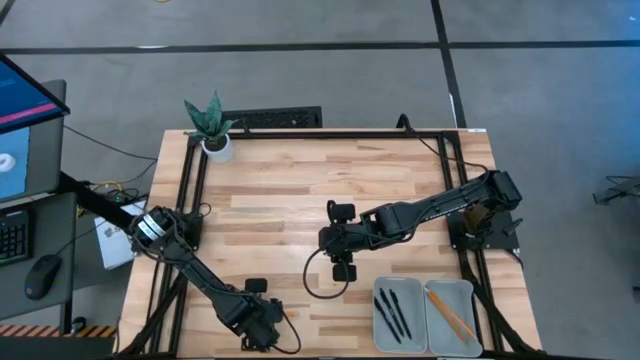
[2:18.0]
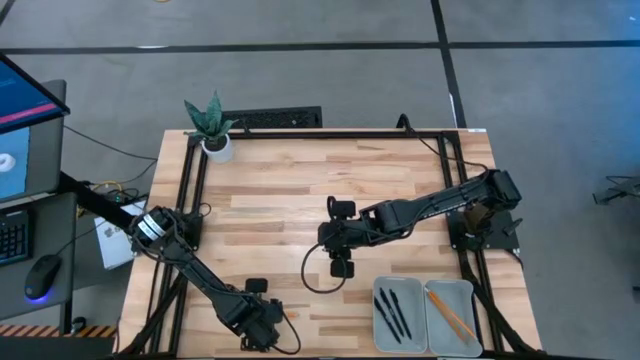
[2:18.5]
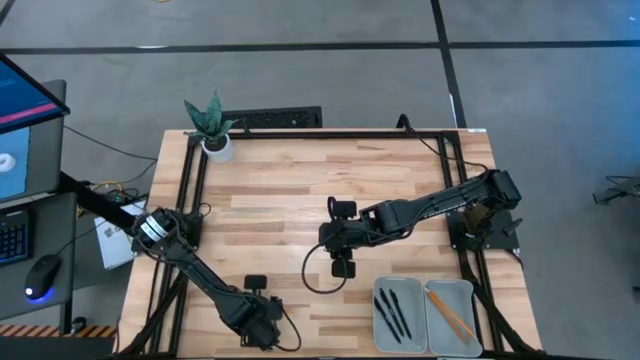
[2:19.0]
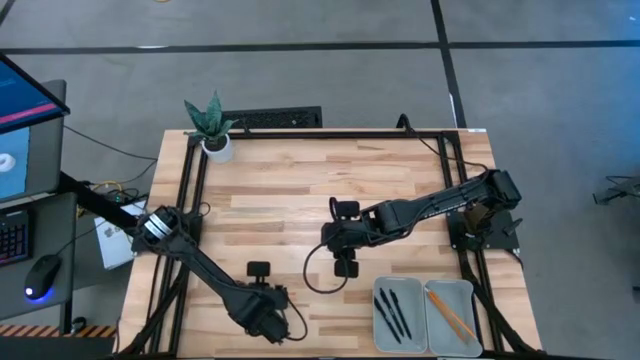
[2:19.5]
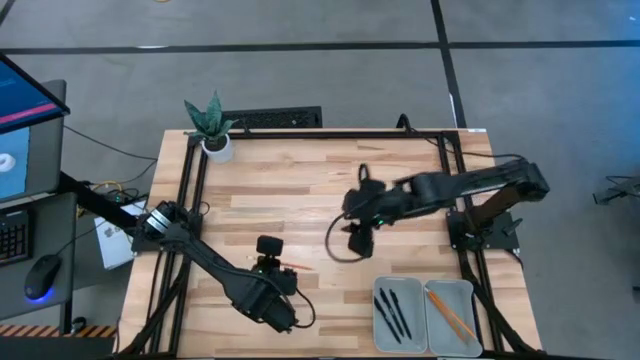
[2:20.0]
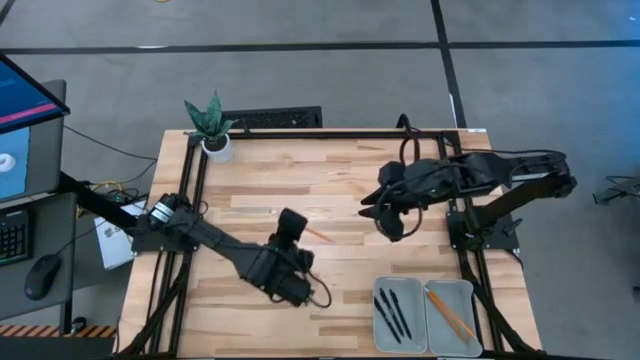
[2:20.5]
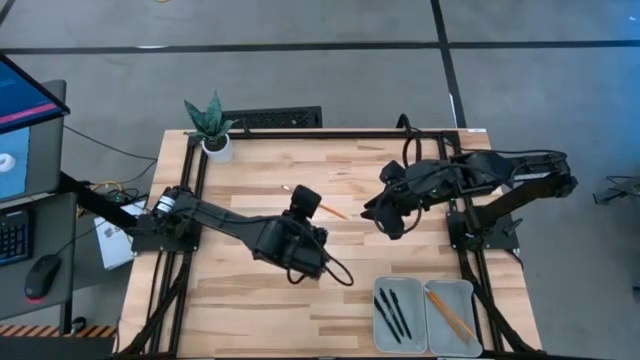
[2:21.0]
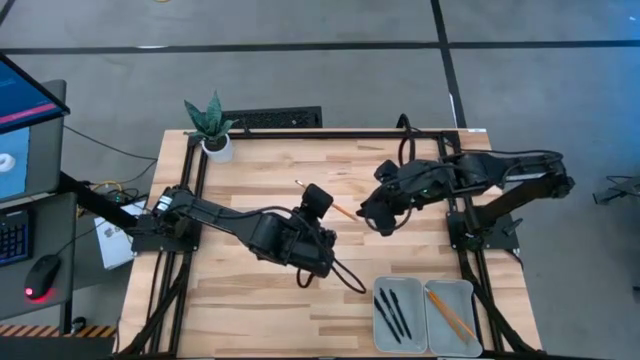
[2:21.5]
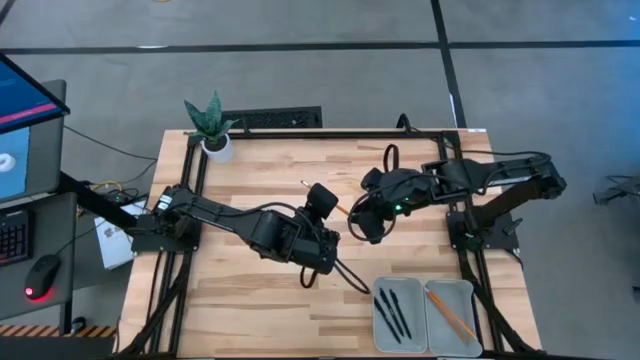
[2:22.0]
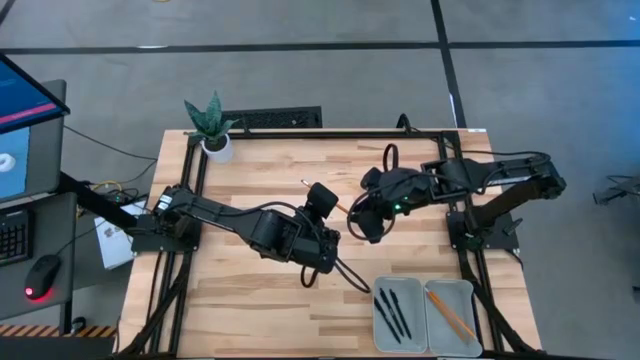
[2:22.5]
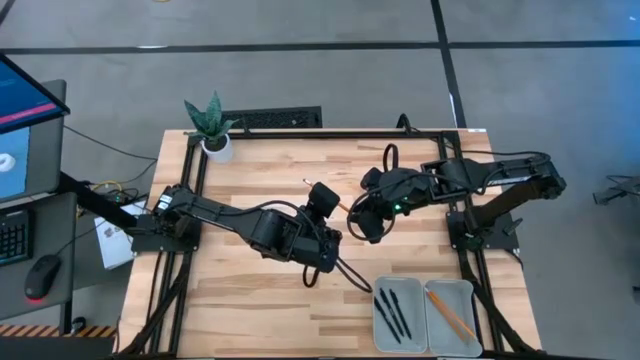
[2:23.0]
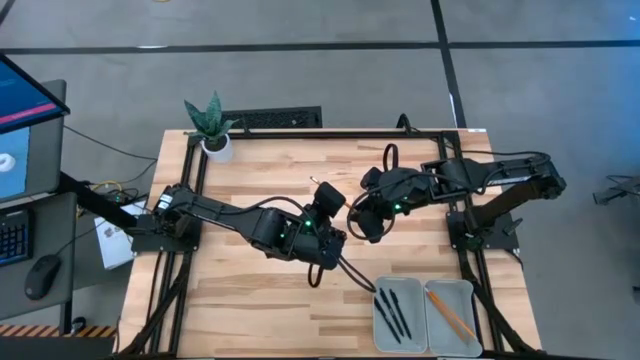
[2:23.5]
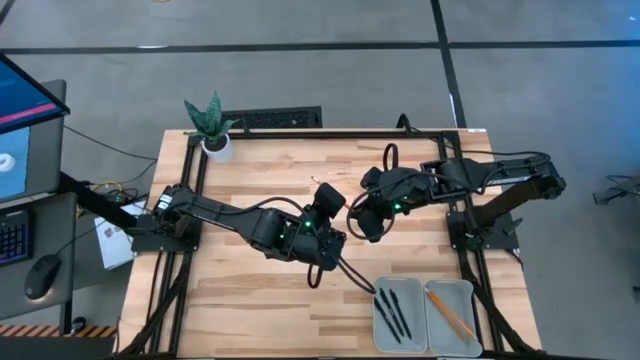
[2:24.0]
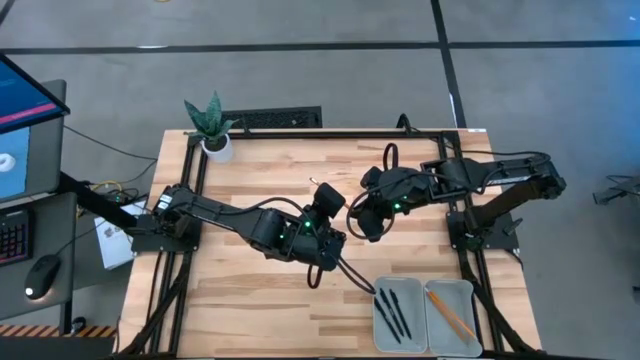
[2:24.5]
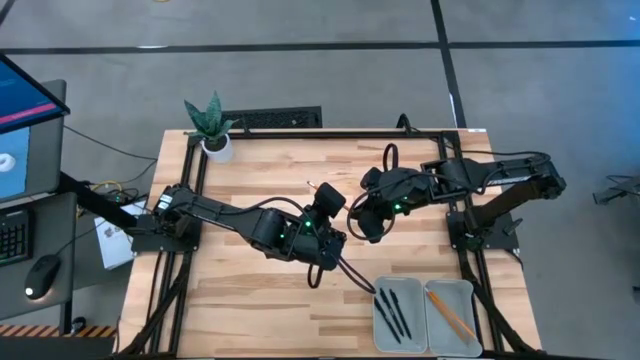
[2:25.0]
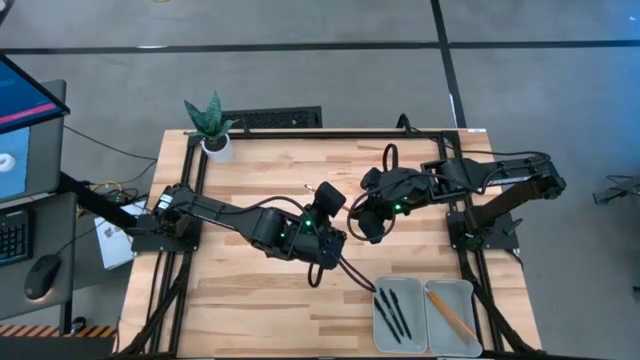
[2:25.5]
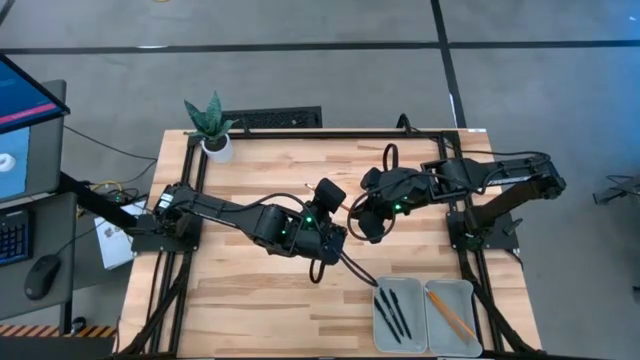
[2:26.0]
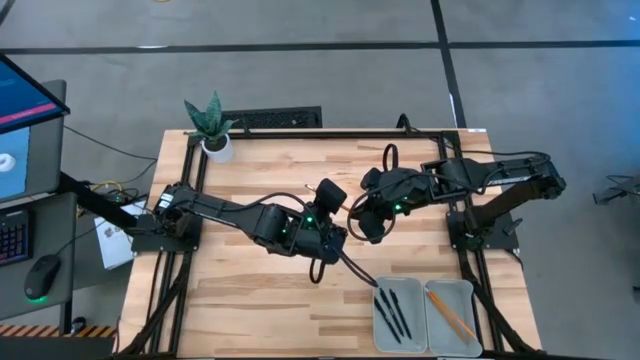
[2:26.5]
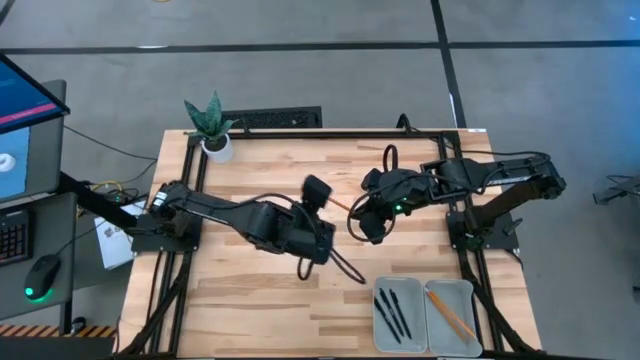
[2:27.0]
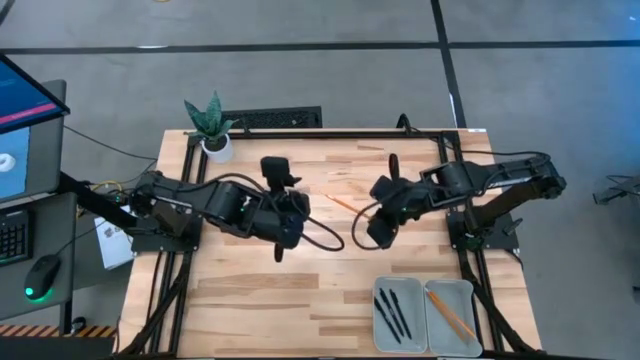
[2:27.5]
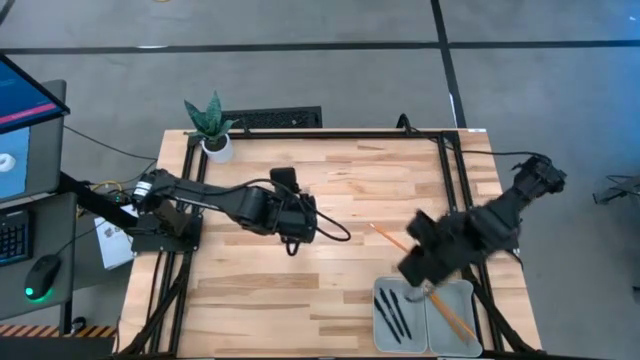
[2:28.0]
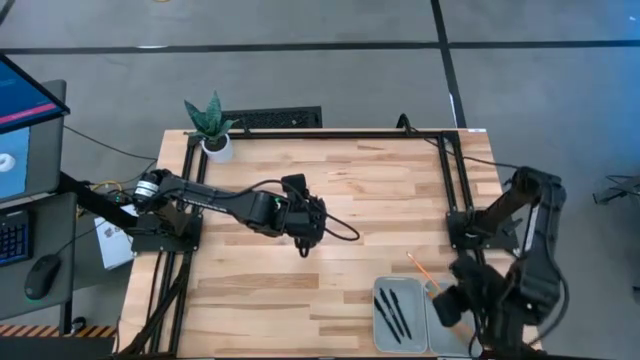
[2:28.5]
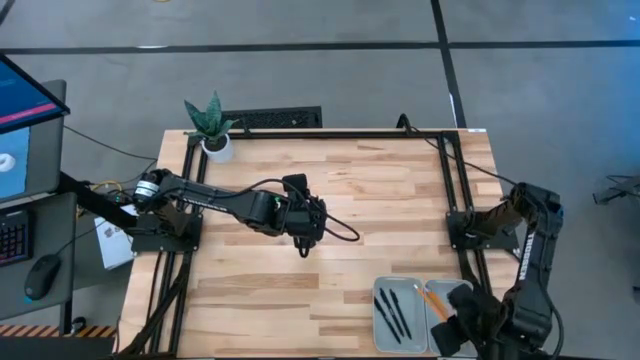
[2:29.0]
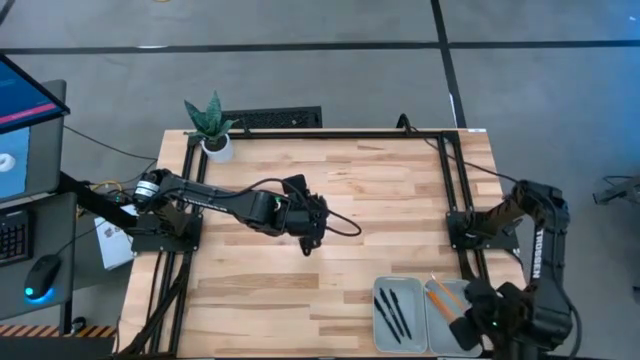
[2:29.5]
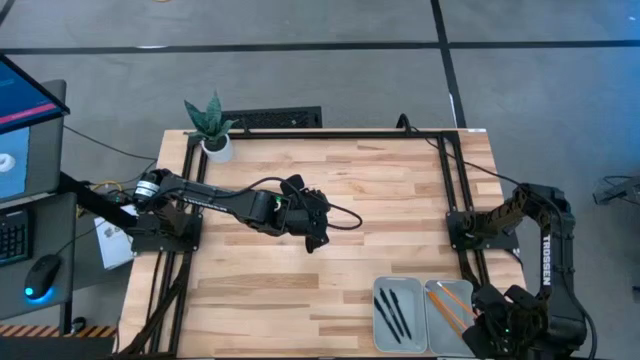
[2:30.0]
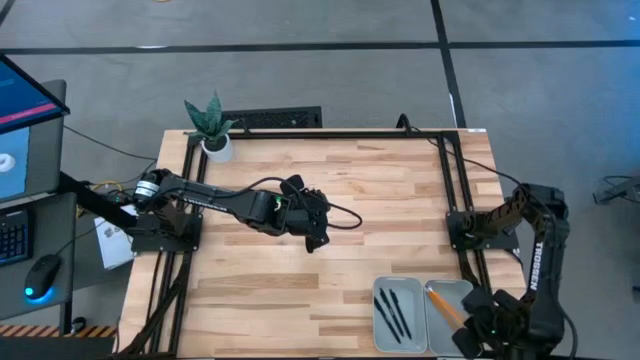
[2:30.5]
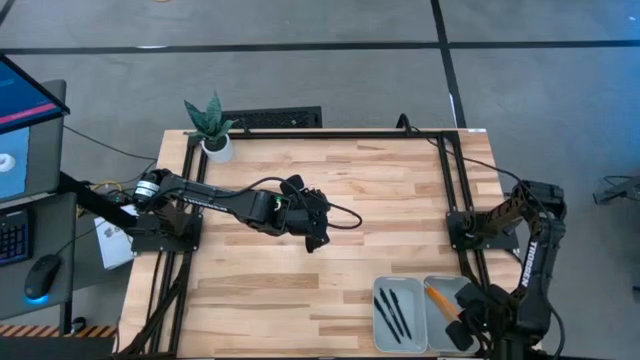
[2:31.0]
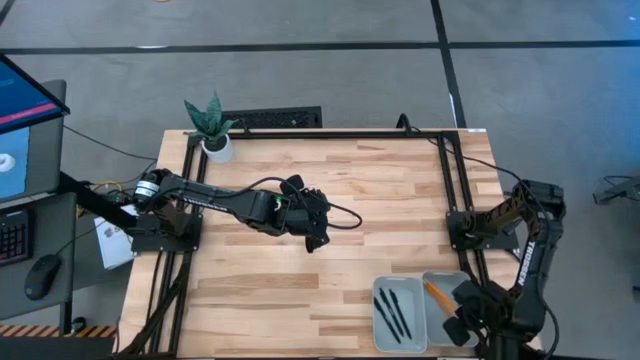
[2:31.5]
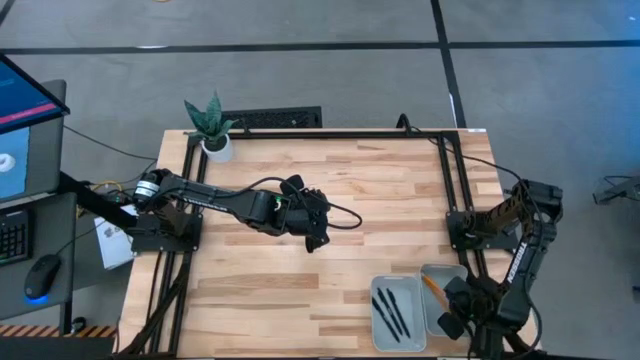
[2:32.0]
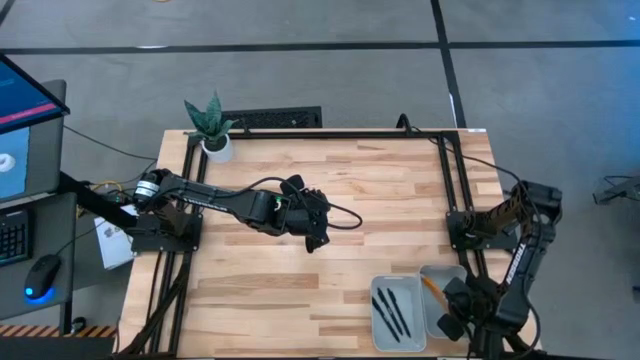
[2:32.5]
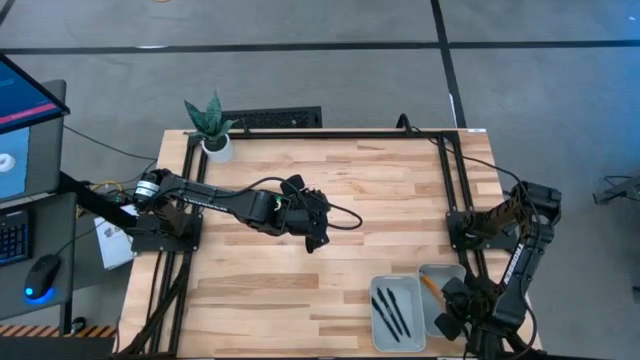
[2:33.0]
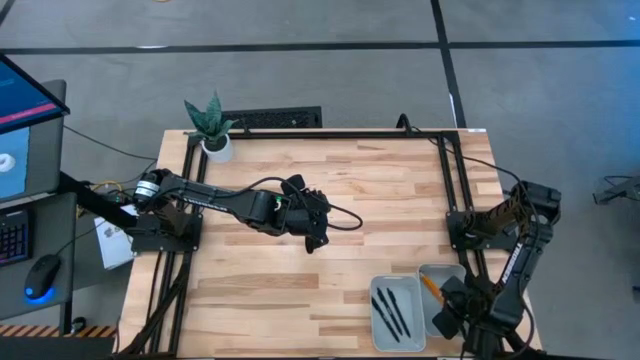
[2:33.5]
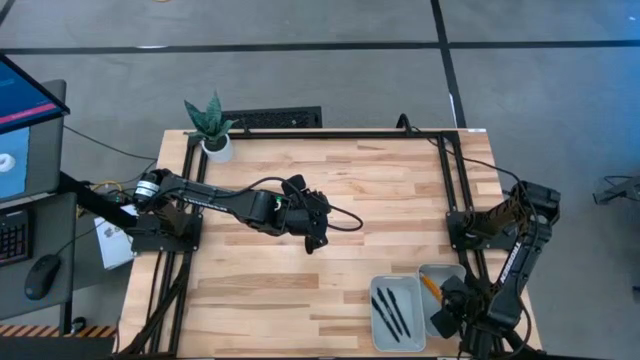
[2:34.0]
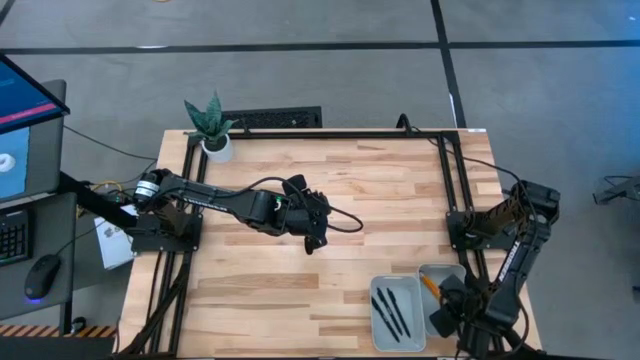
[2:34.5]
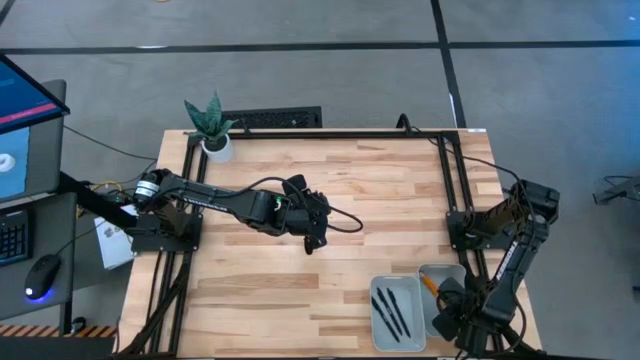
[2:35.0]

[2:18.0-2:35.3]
Task: Sort pens & pencils
Put the orange pencil into the bottom right gray bin

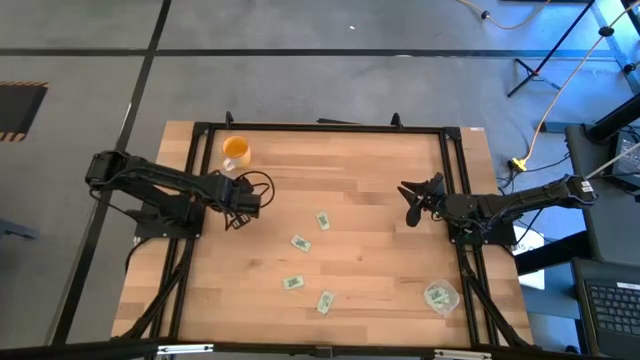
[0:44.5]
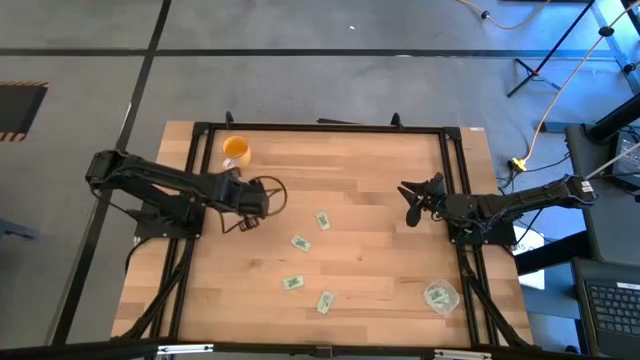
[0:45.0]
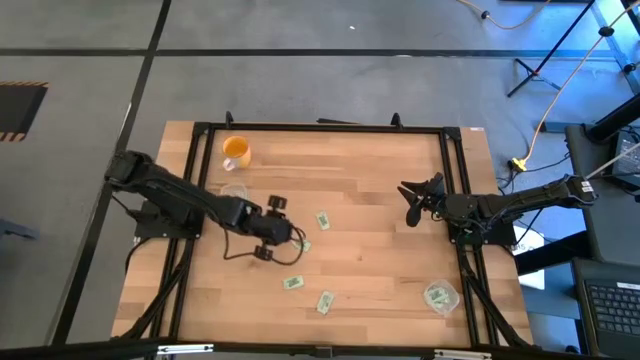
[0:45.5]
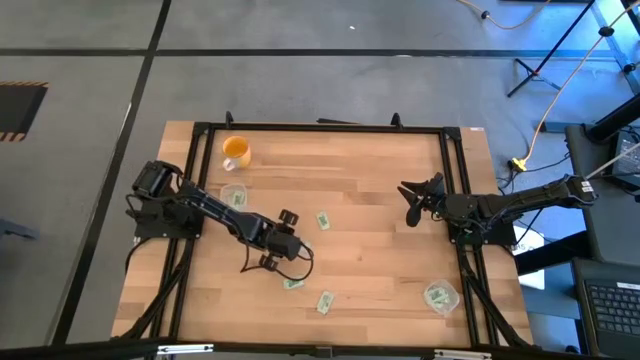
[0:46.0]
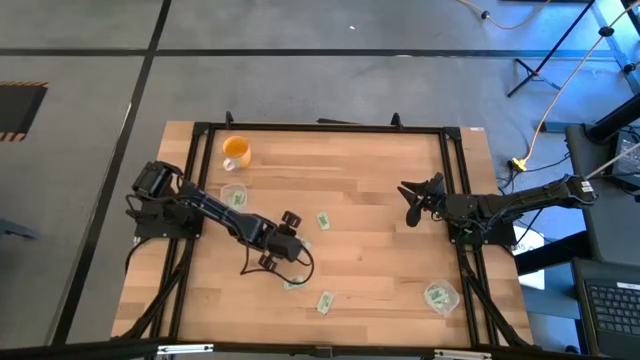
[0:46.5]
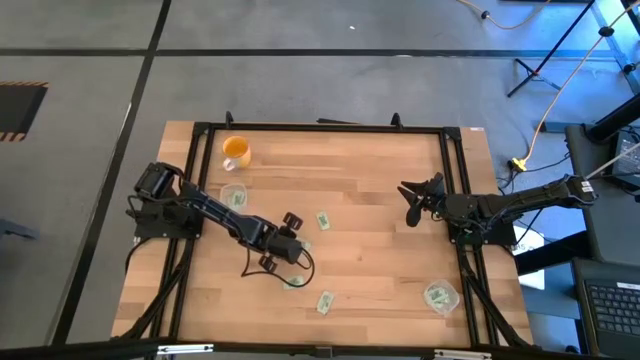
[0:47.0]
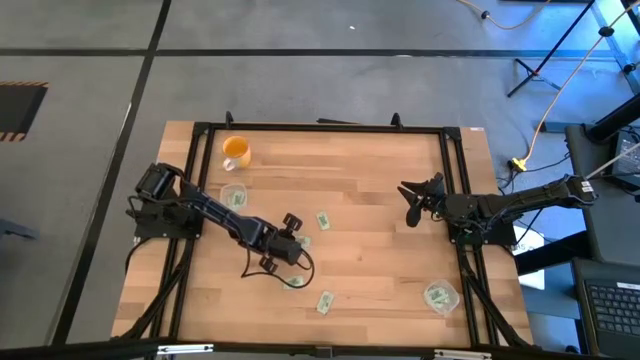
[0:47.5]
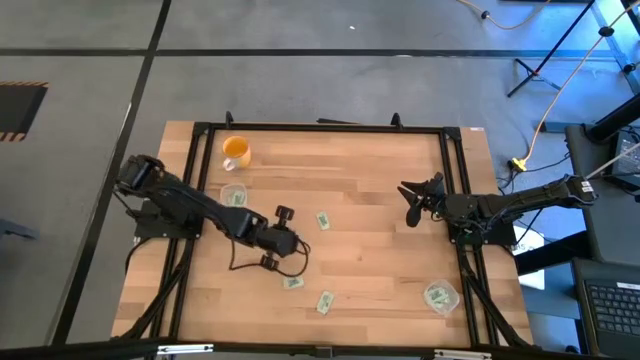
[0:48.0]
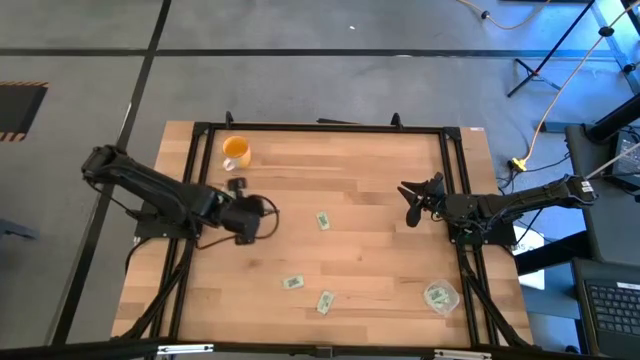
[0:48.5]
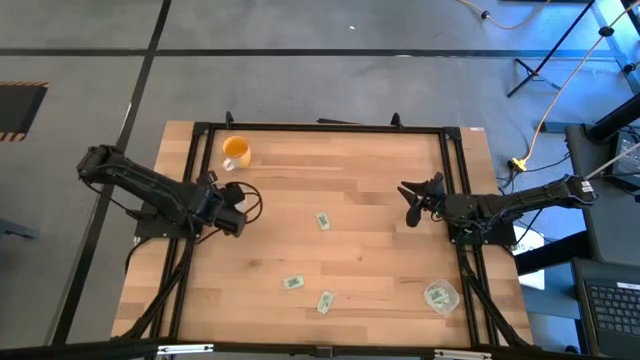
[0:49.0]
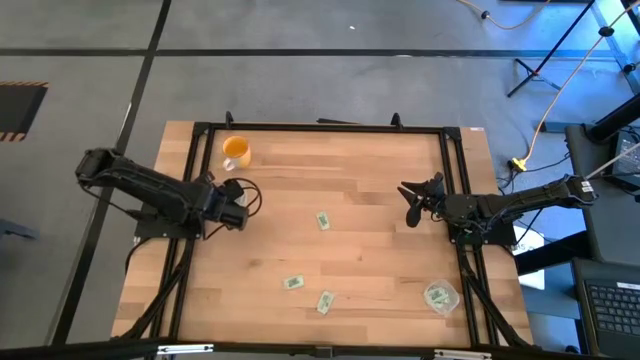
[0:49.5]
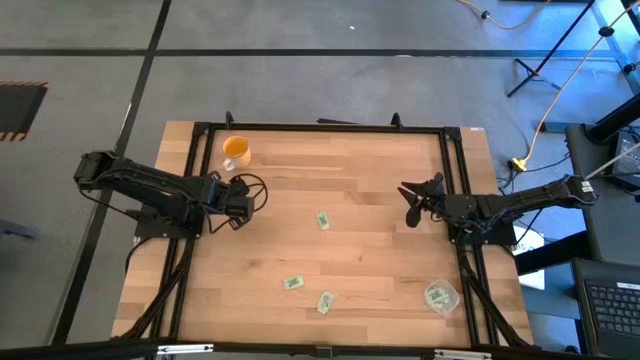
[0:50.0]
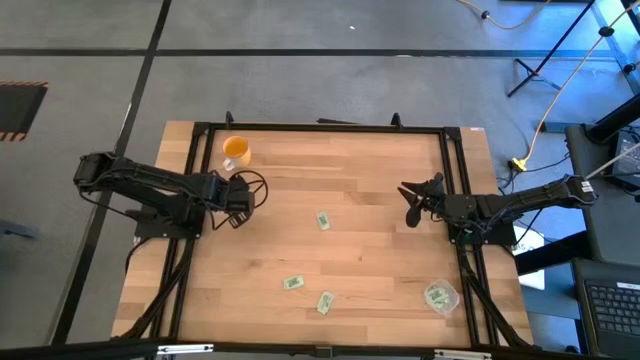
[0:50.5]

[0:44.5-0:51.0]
Task: Pick and place items into bin
Put the green stevia packet into the top transparent bin
